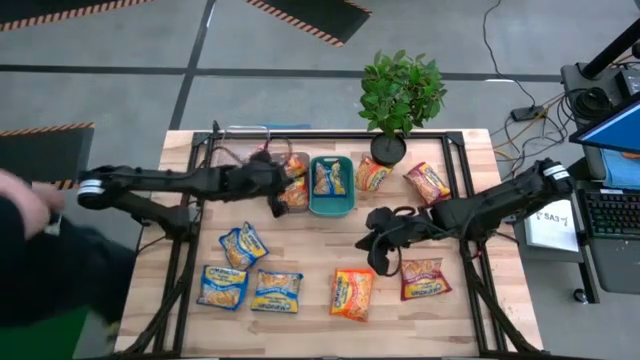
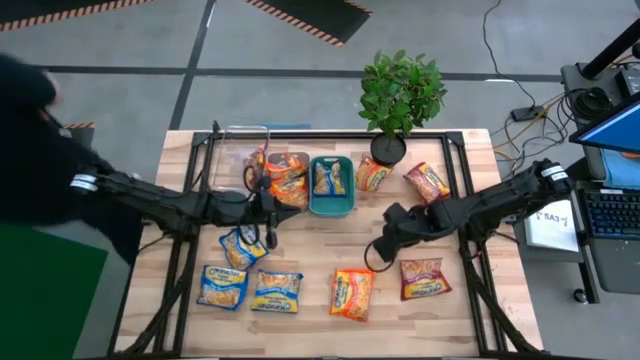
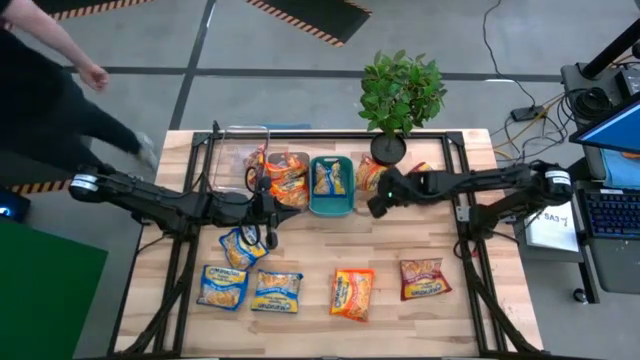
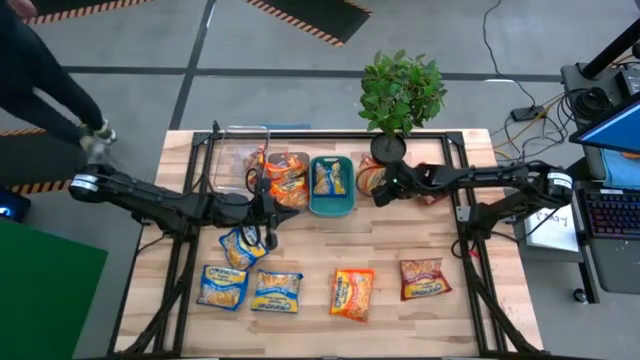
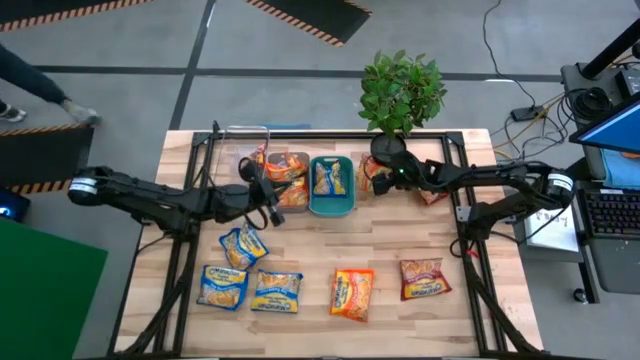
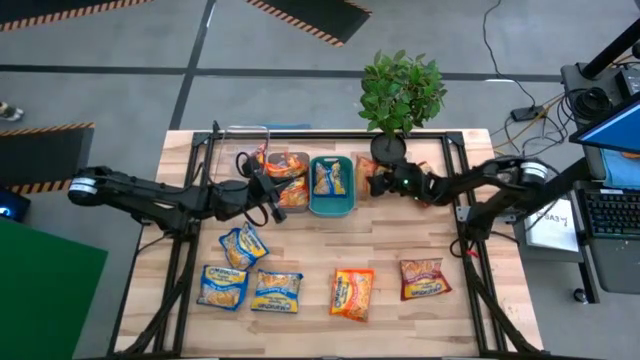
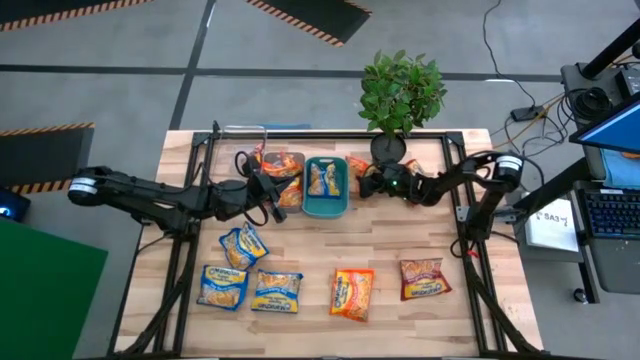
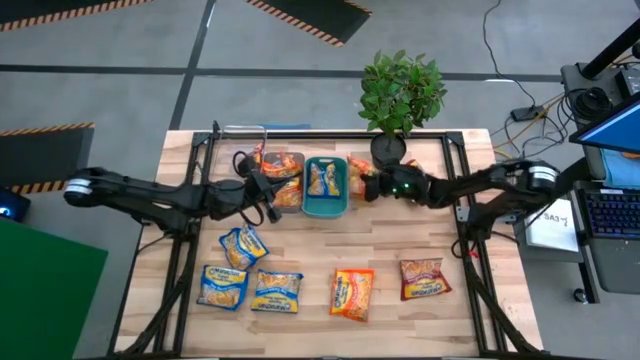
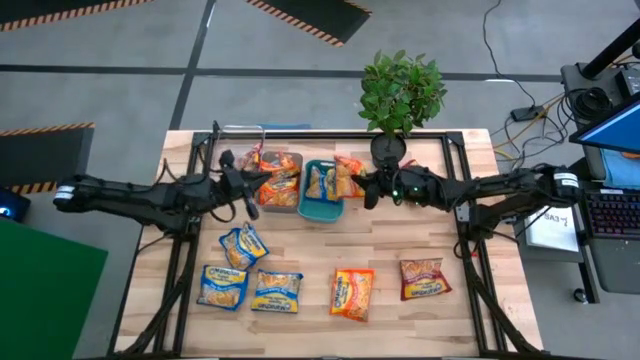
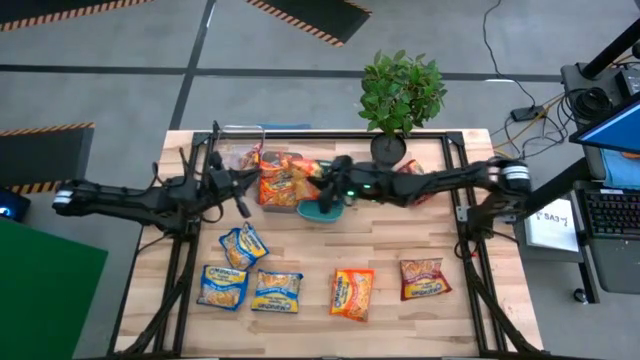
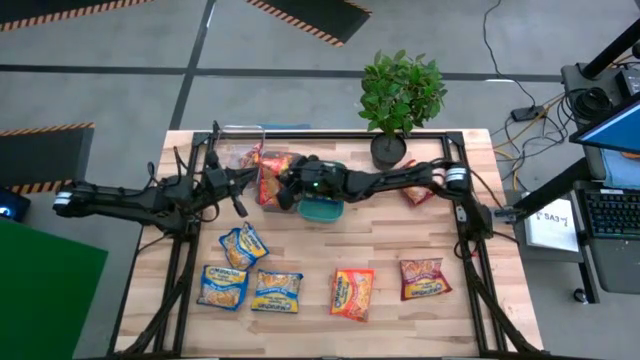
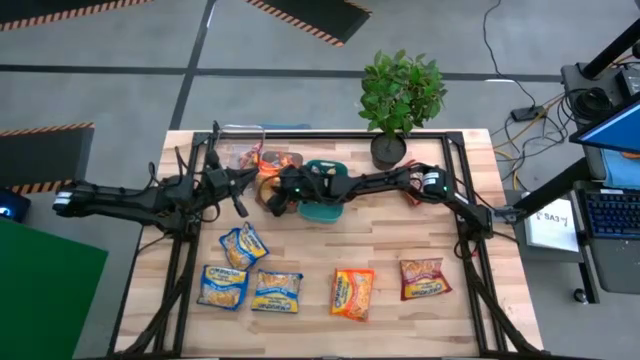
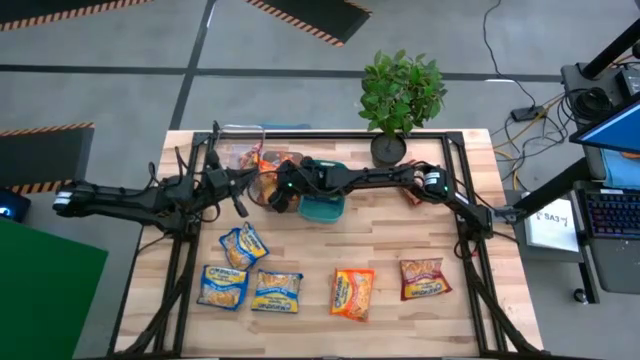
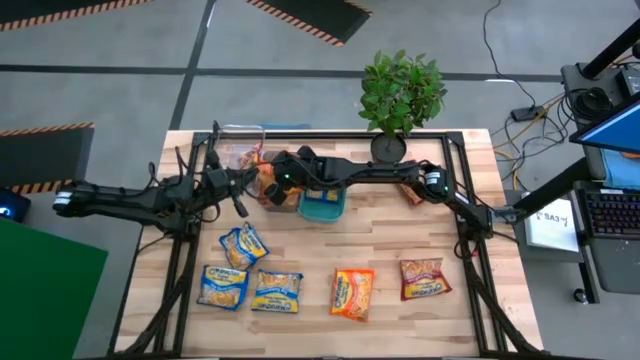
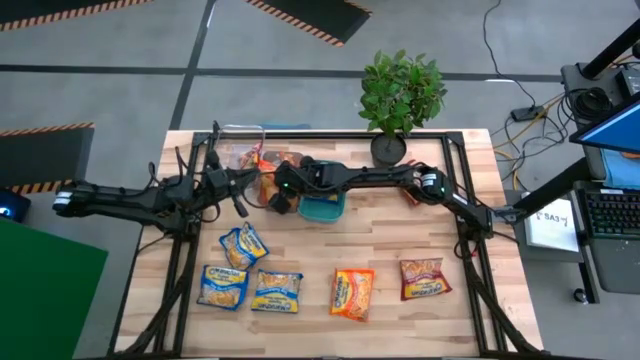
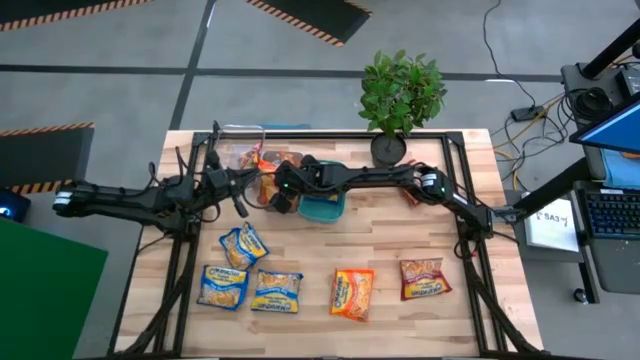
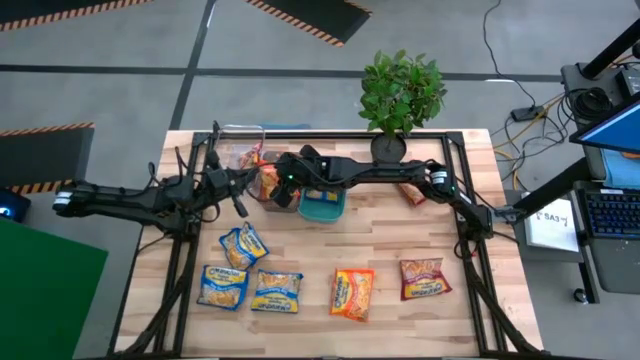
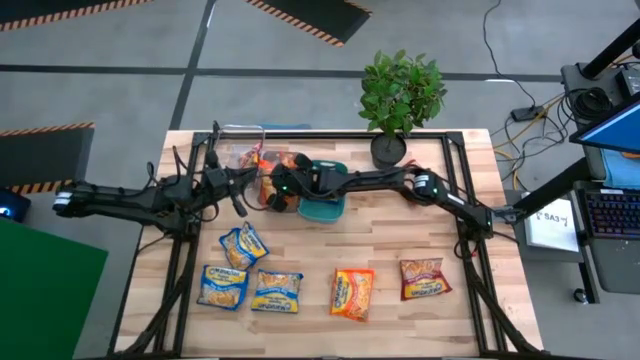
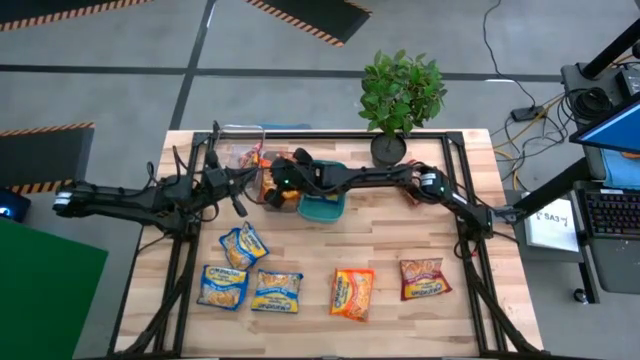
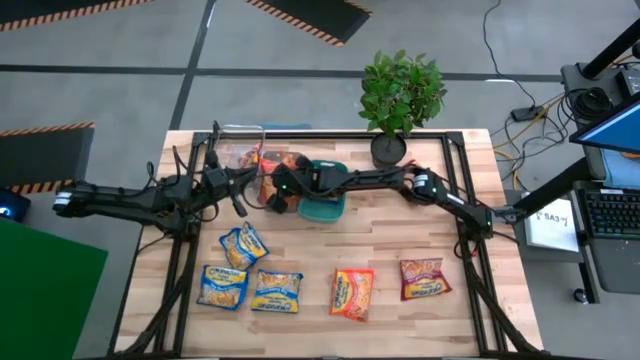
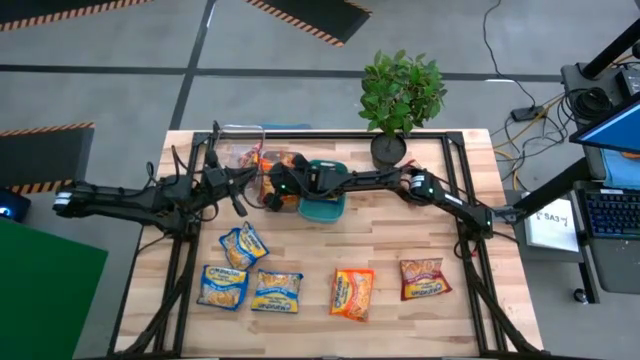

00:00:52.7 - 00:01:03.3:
Task: Sort Maruchan noodles
Put the orange noodle pack into the black bin

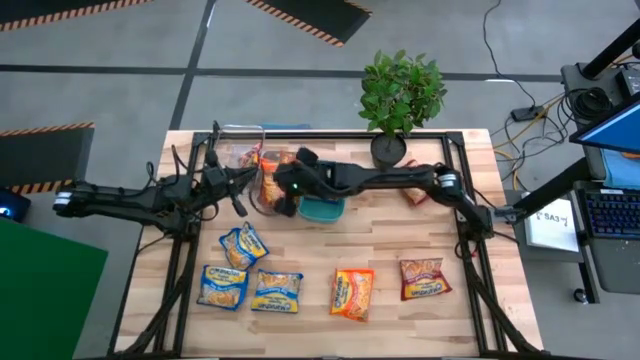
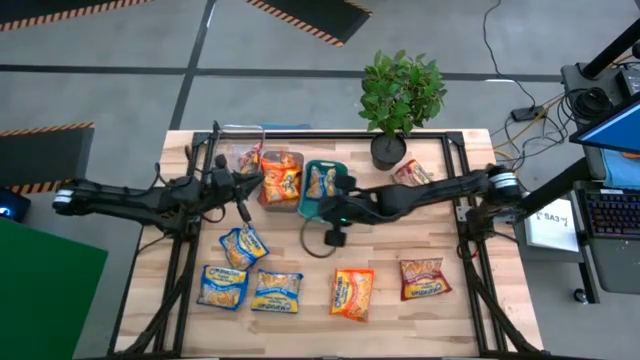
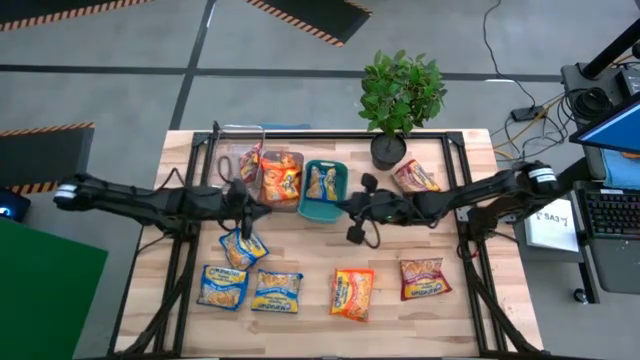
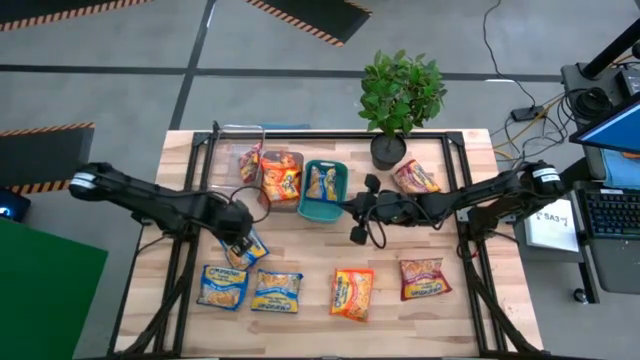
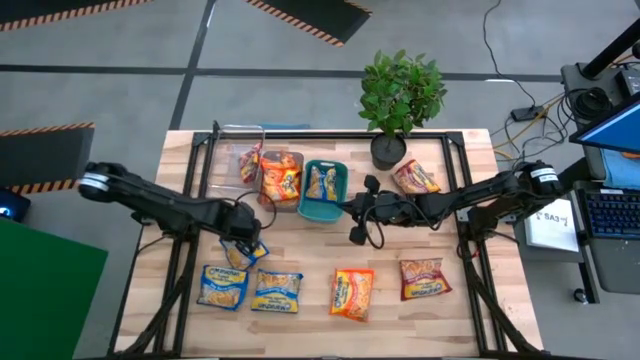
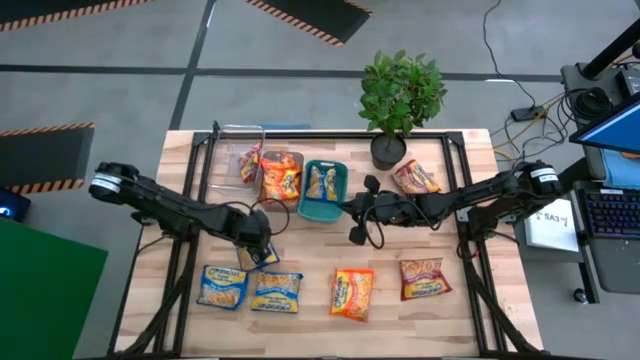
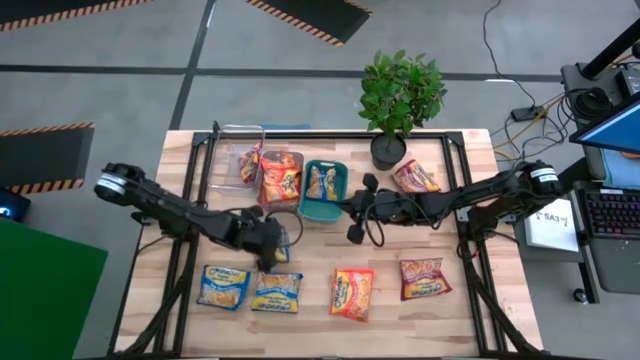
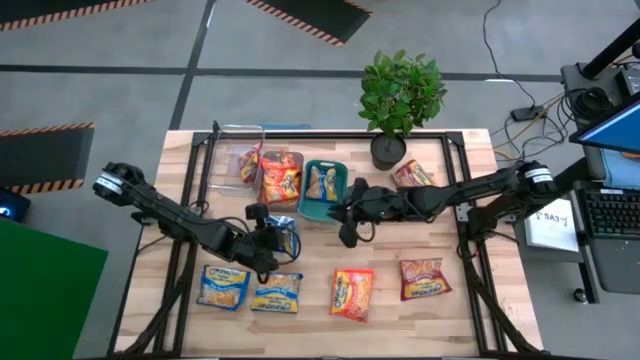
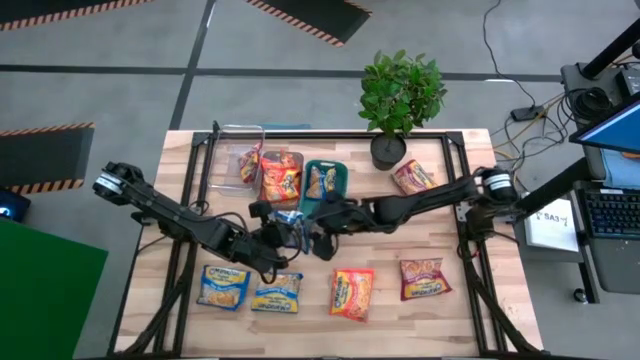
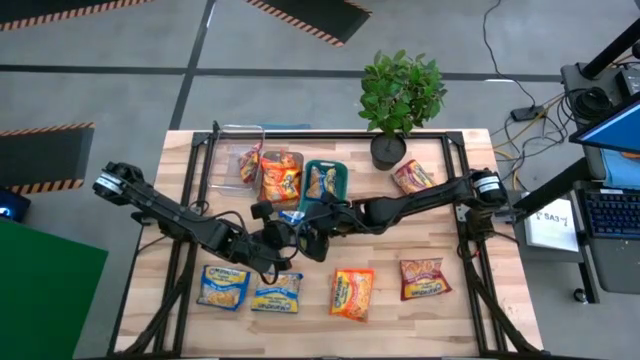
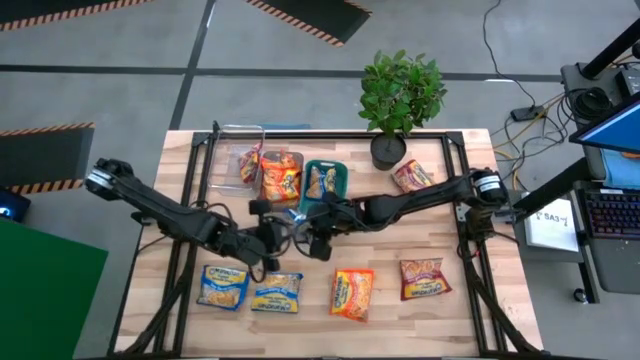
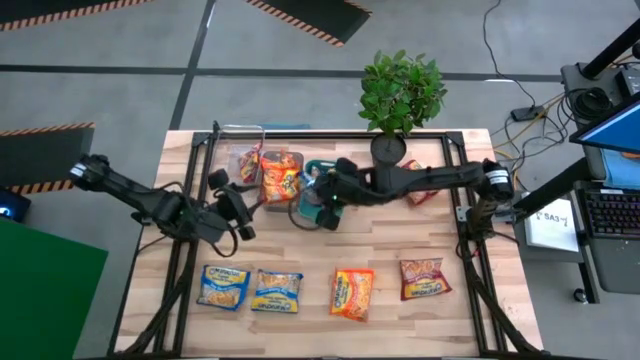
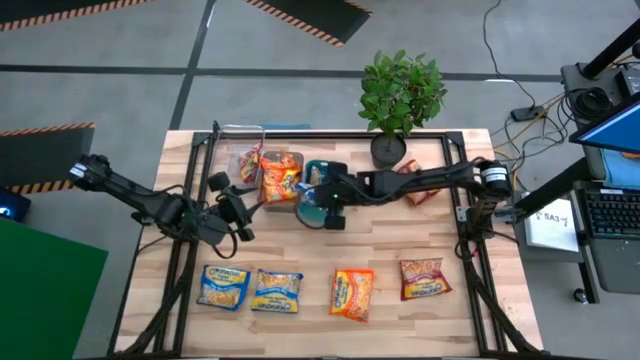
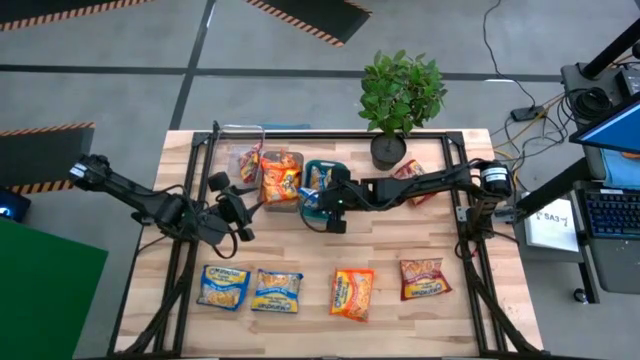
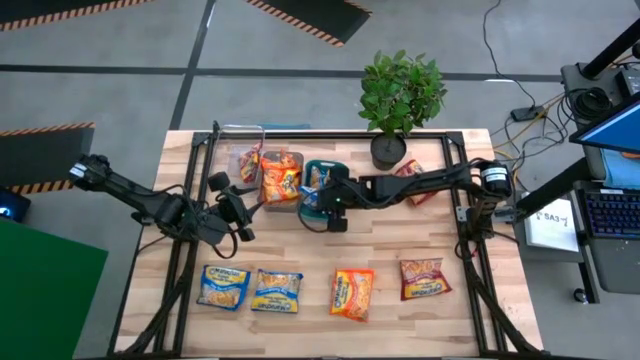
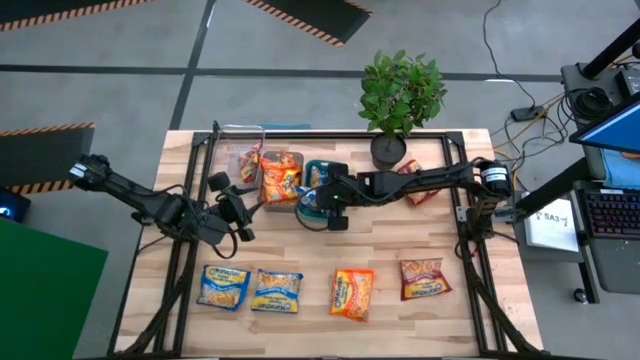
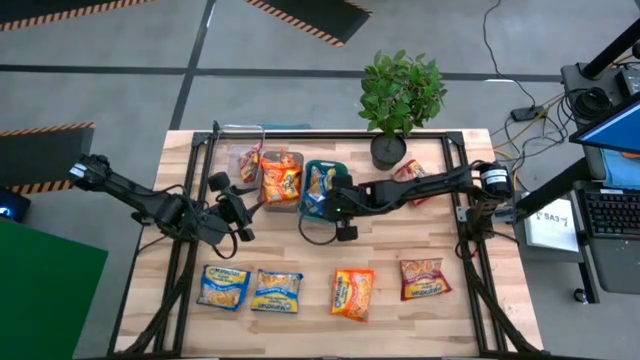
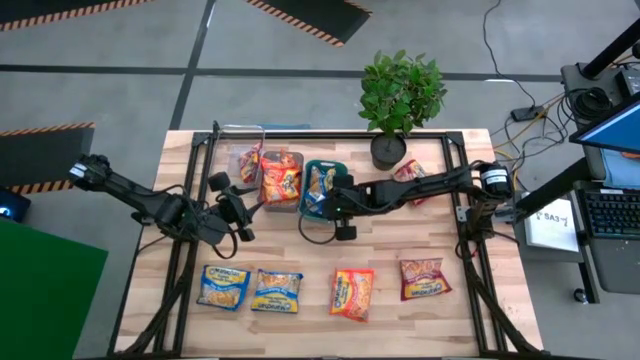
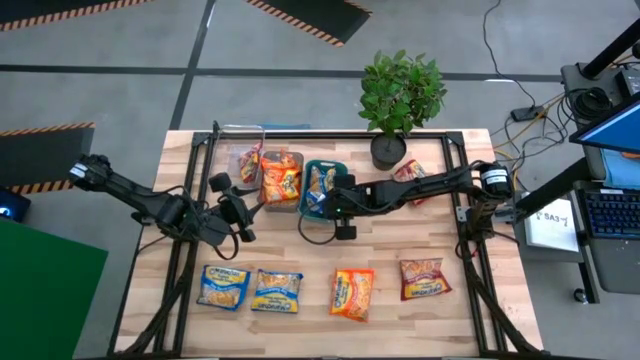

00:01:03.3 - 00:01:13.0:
Put the blue noodle pack into the green bin

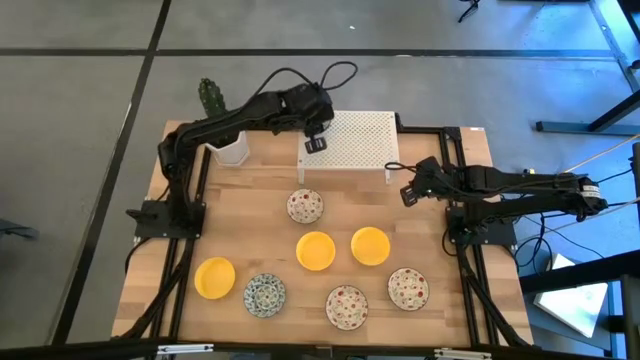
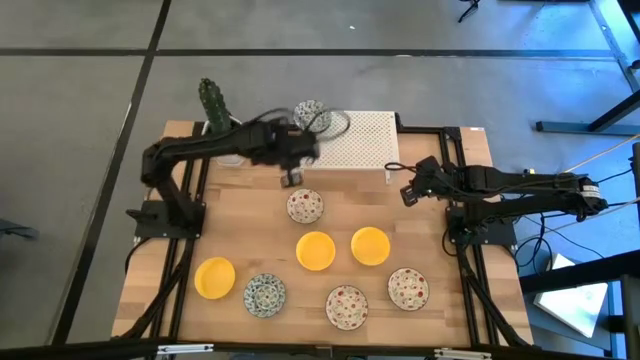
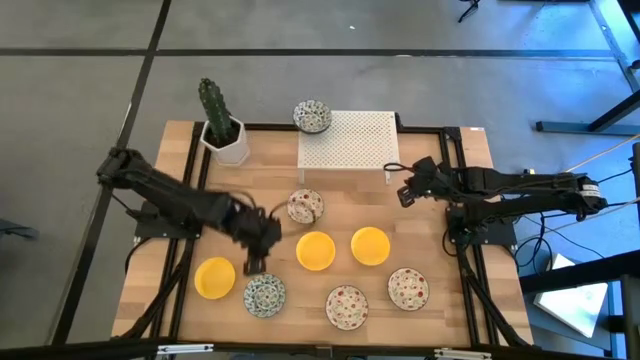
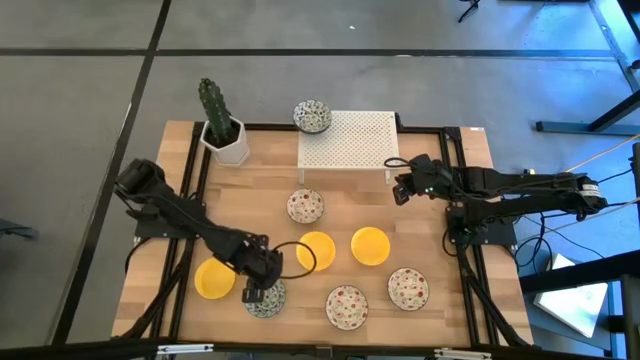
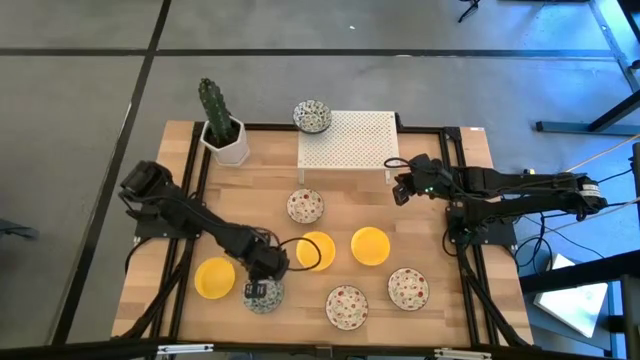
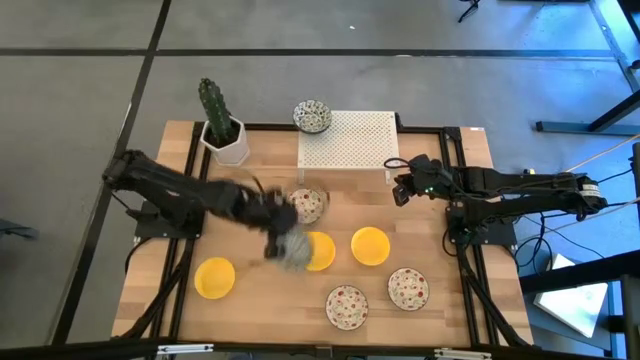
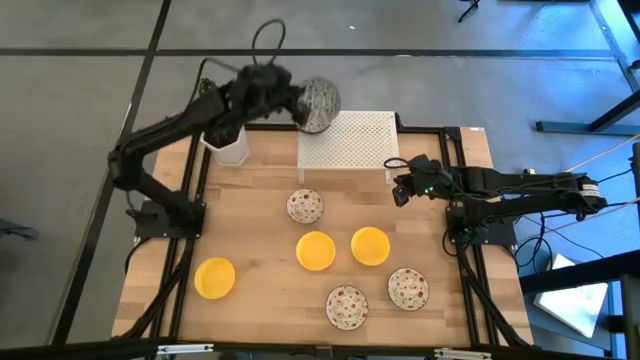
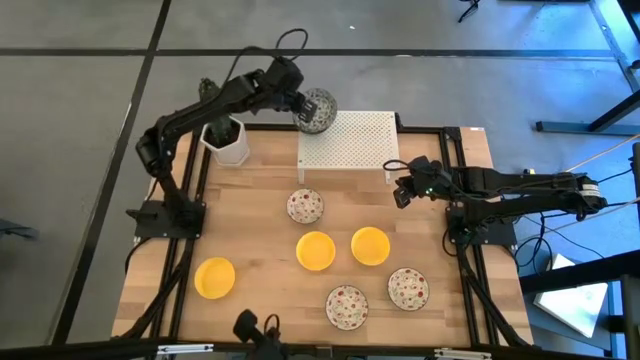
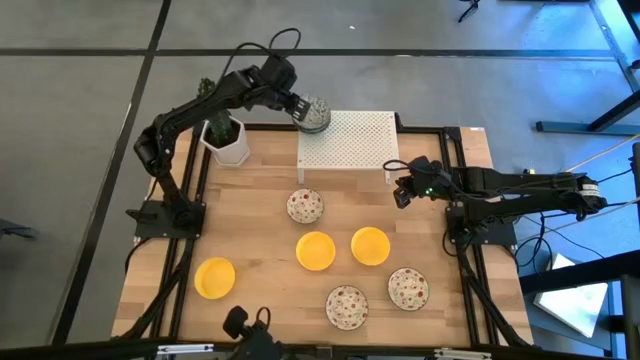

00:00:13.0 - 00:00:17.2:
Task: Pick & Place Mini bowls
Stack the blue white bowl on top of blue white bowl on the shelf
